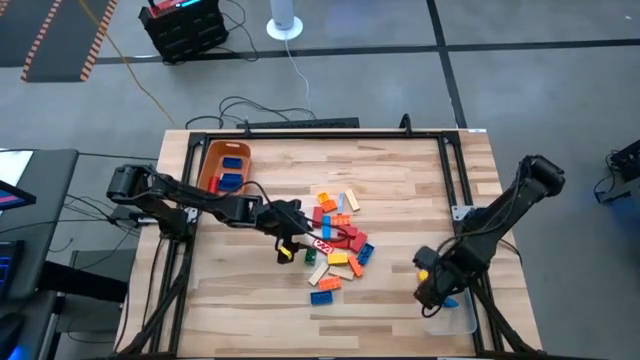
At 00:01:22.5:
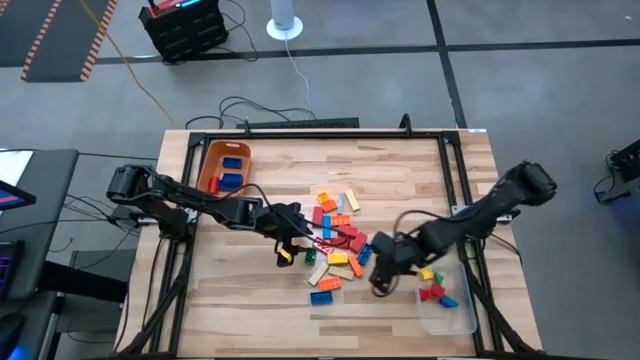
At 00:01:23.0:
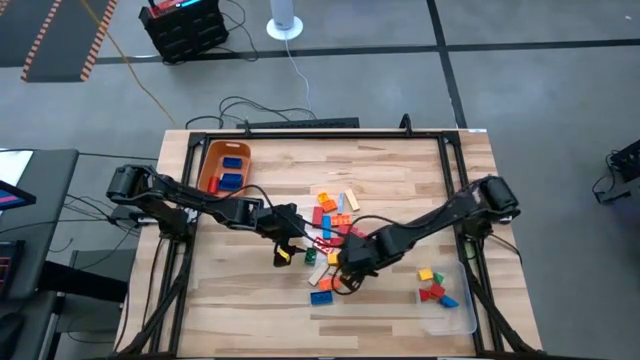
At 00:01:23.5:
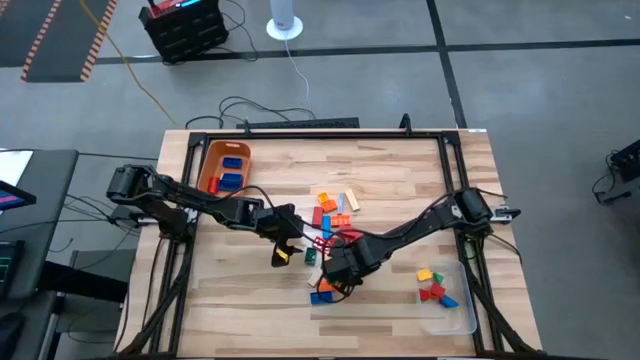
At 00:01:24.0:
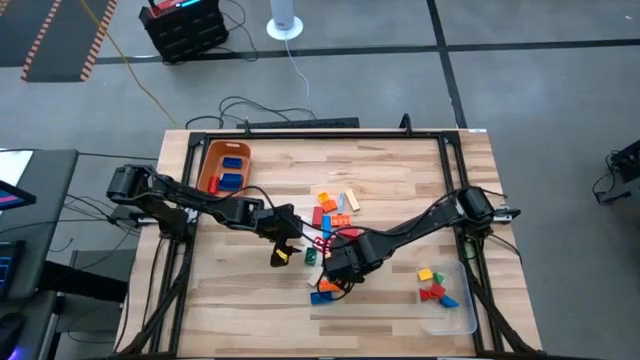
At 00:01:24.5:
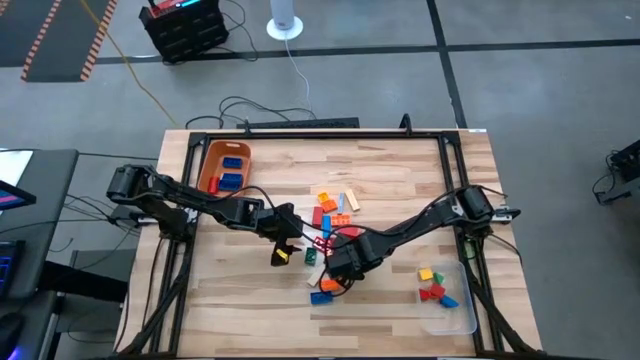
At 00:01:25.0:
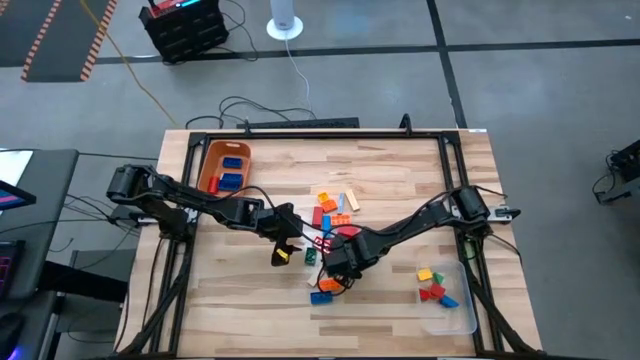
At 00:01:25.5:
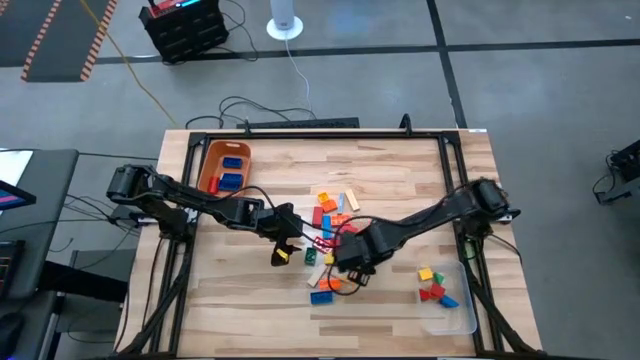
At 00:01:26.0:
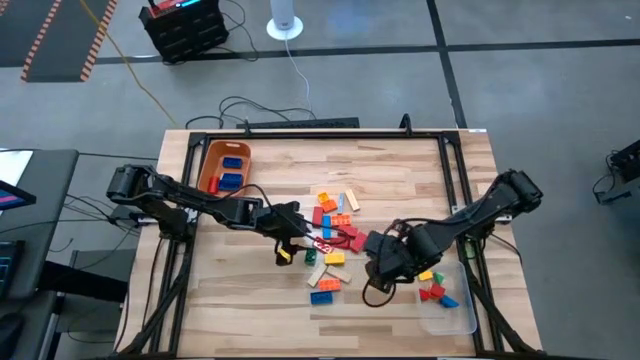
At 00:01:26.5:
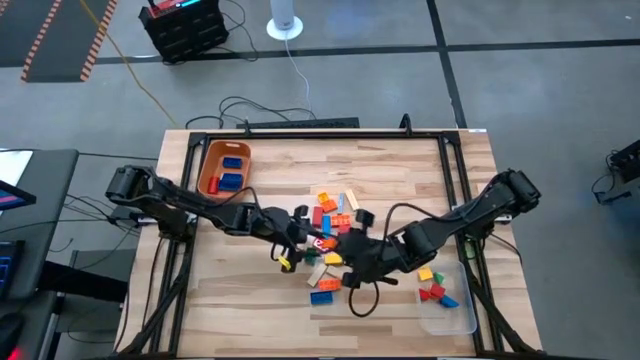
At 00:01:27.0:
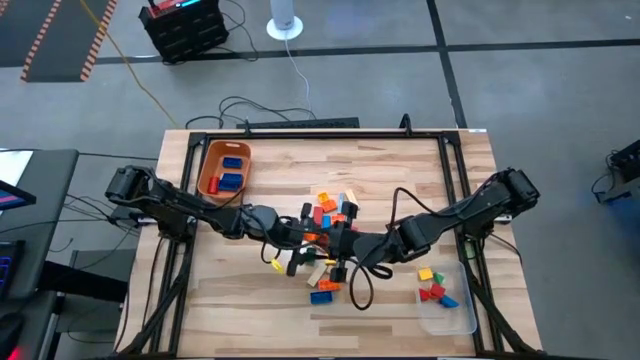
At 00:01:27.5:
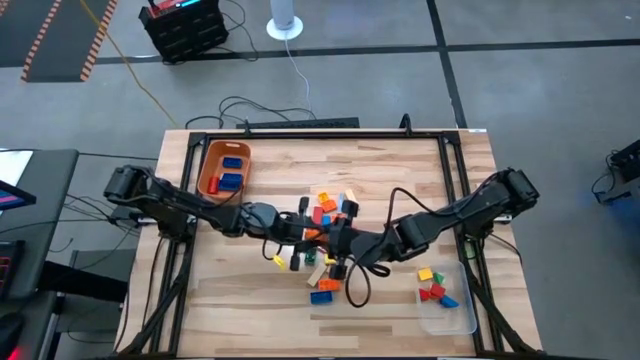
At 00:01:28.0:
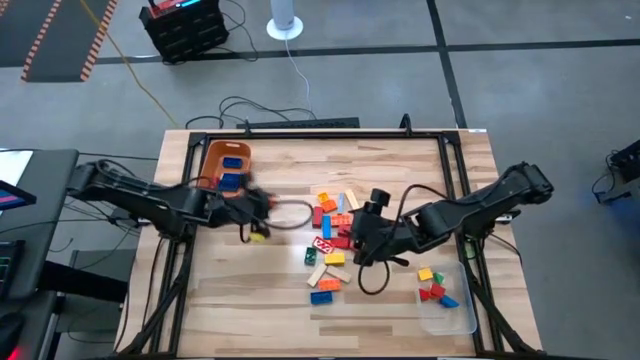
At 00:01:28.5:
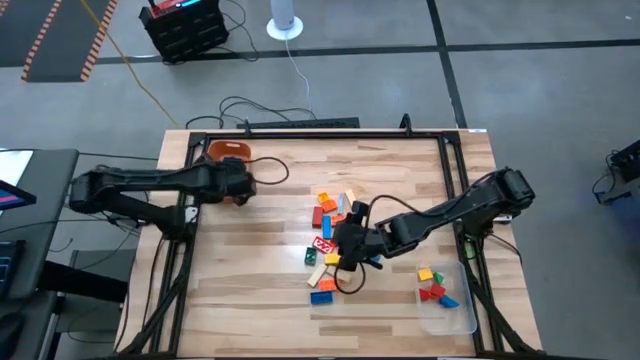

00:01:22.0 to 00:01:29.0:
Task: Sort blocks by size
Put the large orange game piece into the orange bin

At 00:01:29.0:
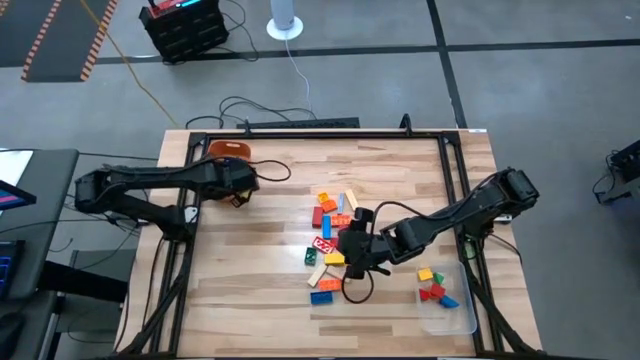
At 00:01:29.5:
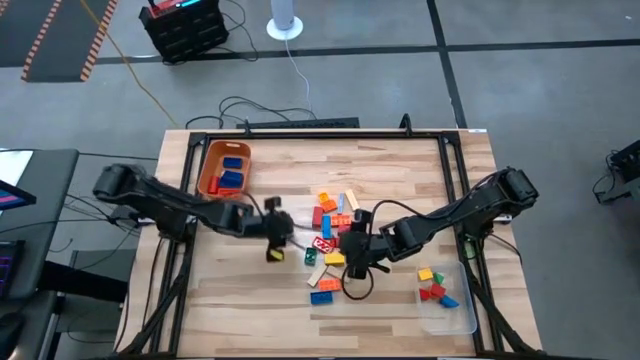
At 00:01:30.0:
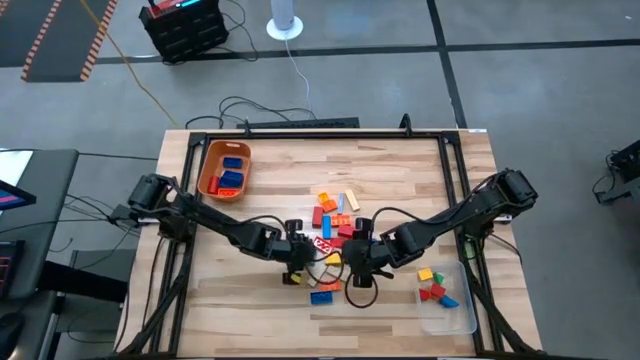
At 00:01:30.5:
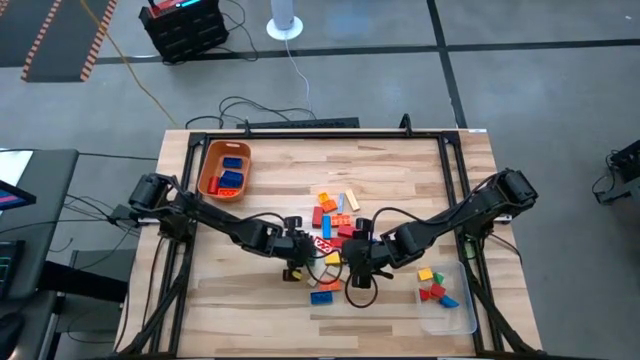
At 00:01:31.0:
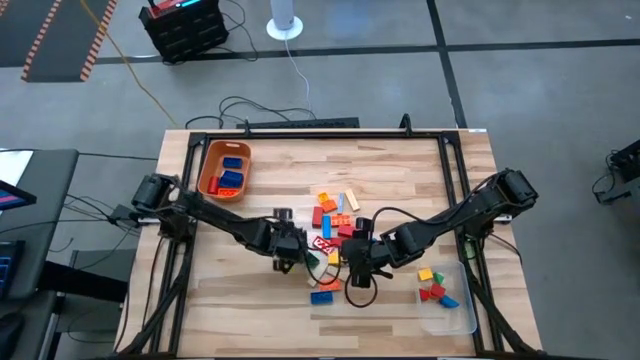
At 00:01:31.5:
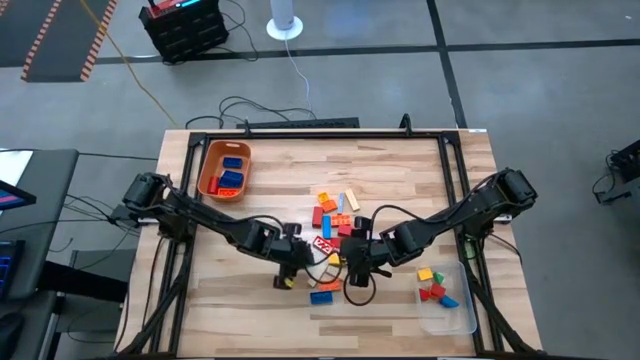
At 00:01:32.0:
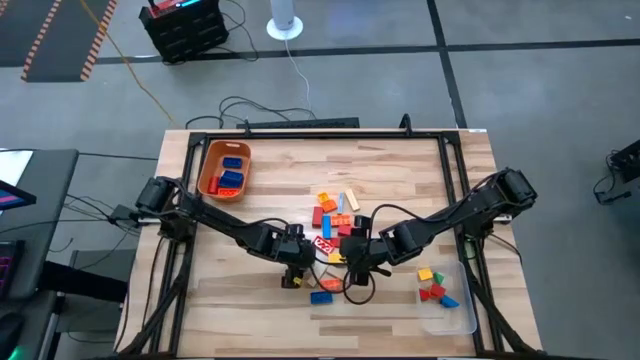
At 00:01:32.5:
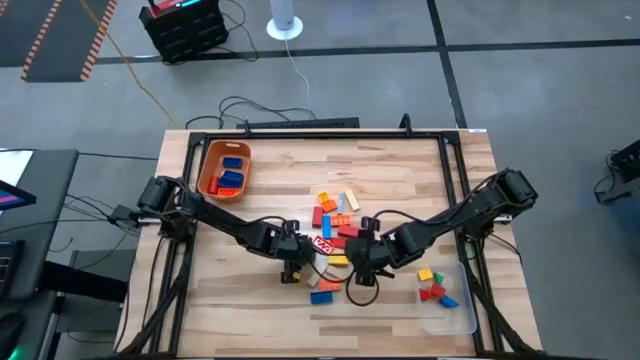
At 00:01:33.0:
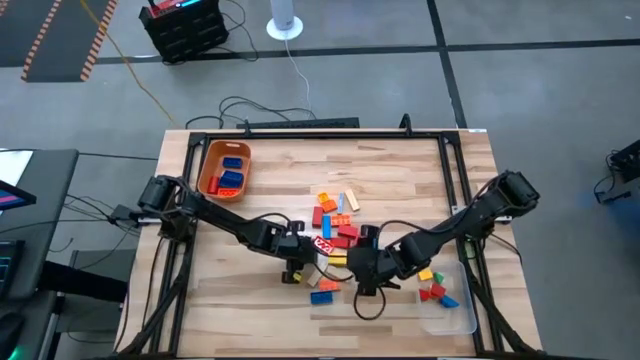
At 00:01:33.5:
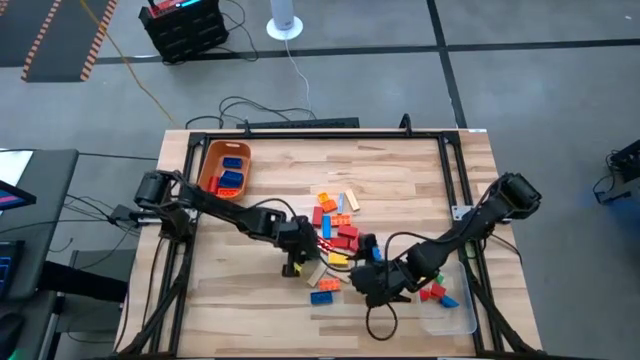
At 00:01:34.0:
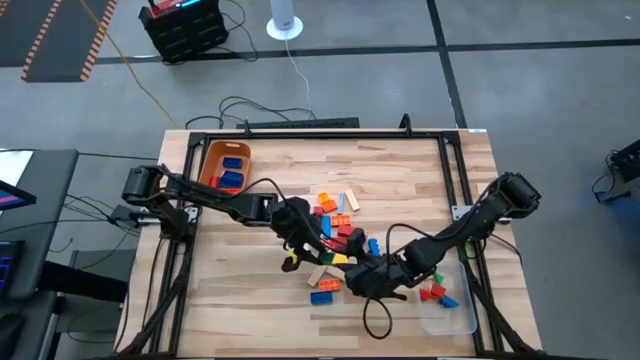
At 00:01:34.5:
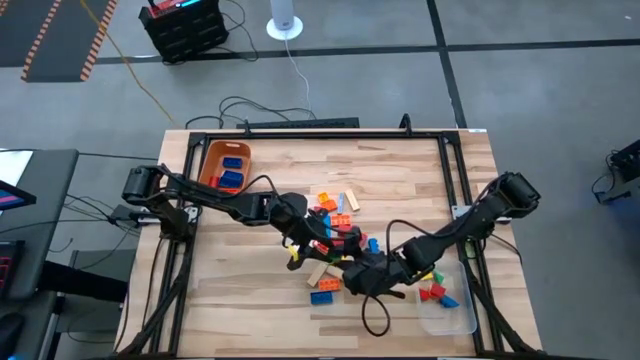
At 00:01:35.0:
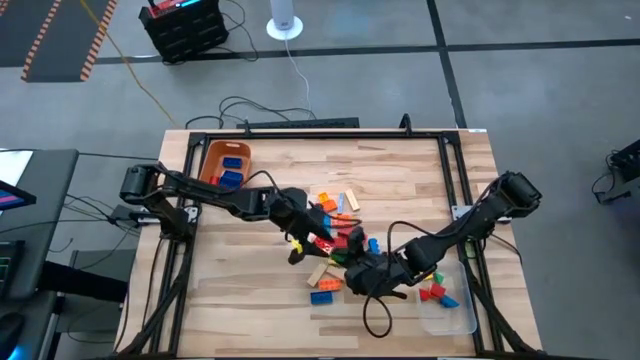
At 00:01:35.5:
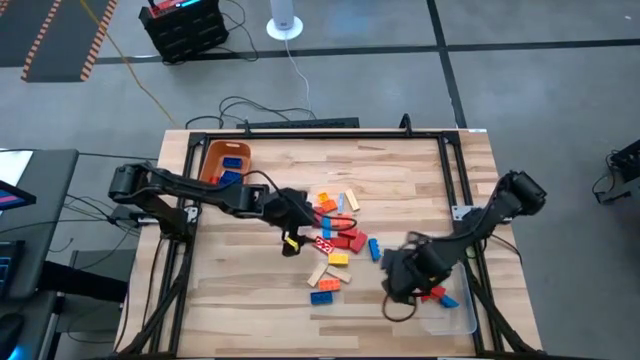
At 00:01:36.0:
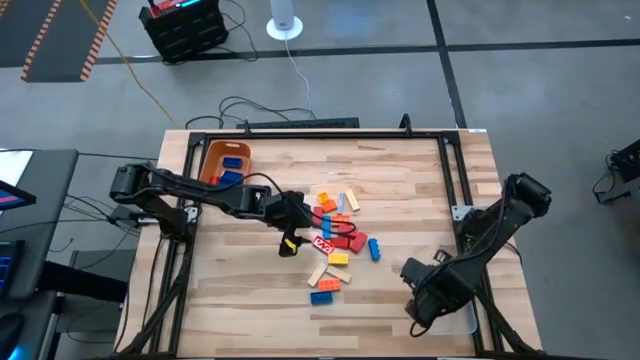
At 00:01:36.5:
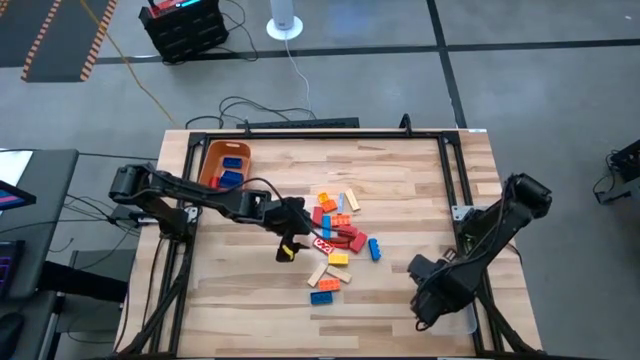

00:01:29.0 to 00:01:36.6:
Put the small green game piece into the transparent bin

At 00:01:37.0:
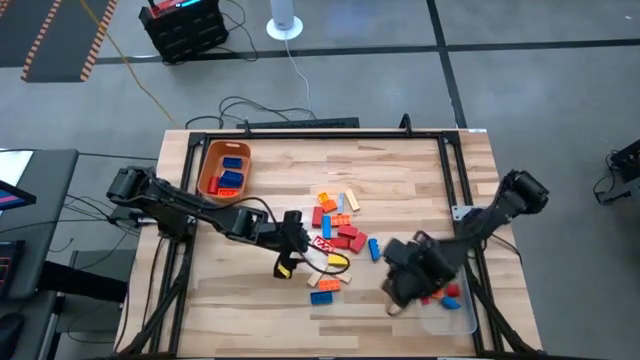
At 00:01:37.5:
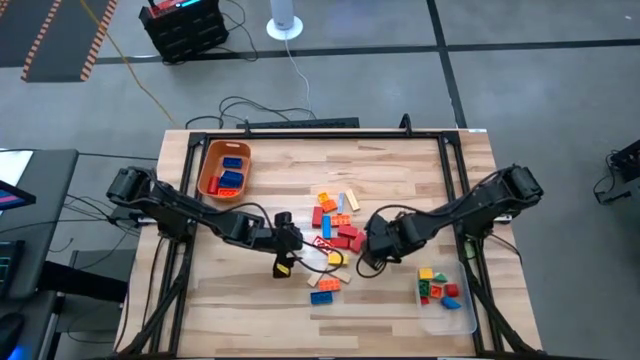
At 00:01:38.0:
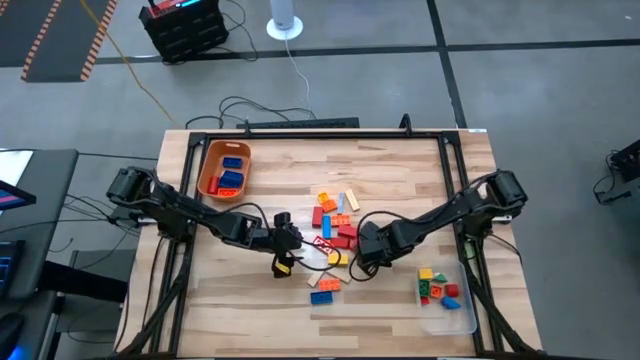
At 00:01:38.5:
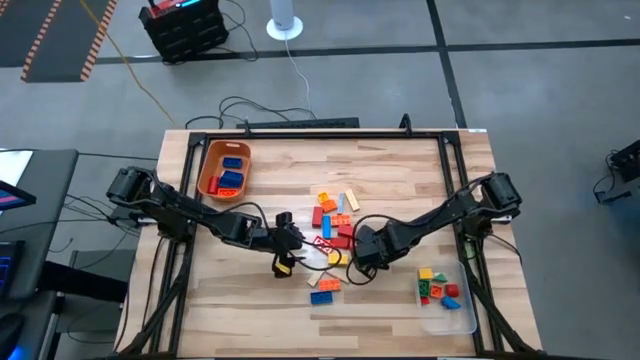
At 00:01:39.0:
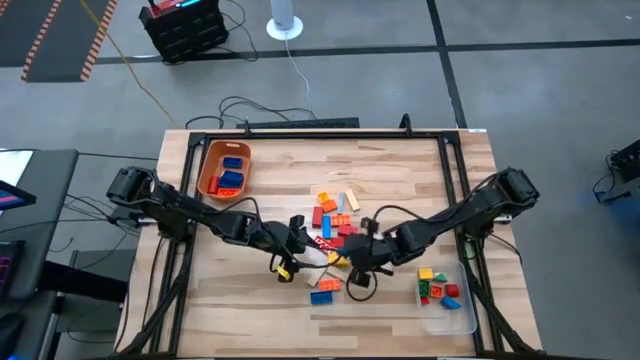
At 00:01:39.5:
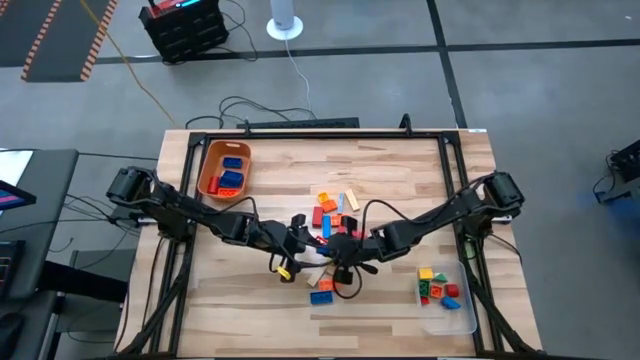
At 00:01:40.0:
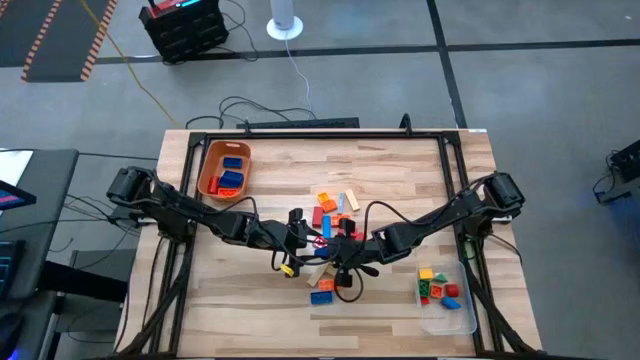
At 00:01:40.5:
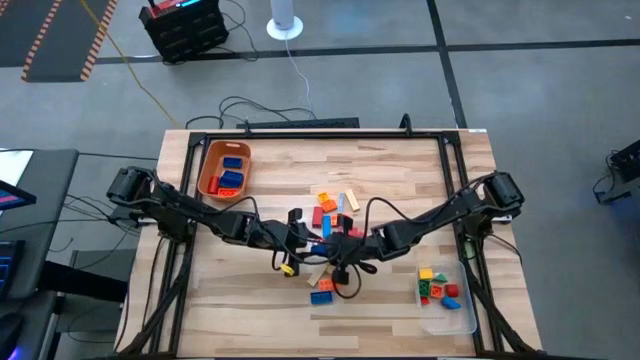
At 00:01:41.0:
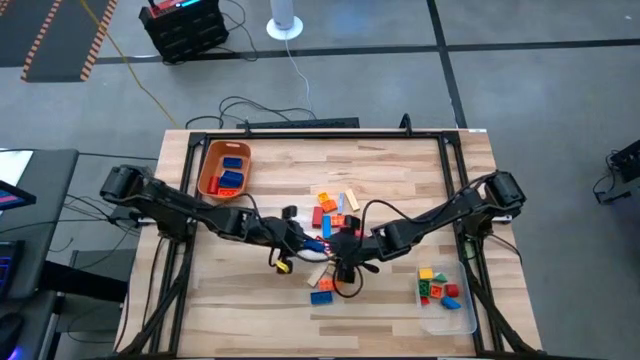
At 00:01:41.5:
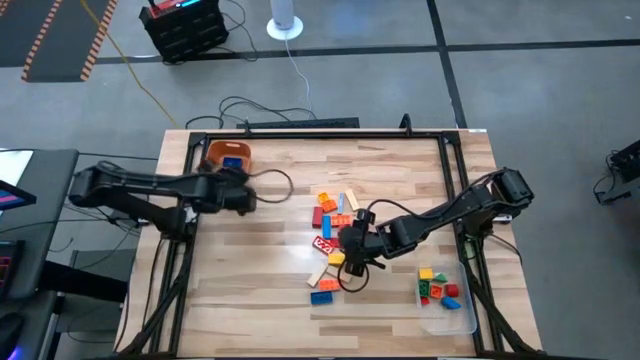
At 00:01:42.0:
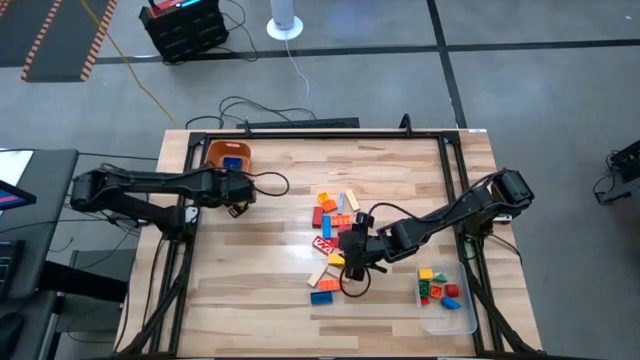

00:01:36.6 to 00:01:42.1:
Put the large blue game piece into the orange bin

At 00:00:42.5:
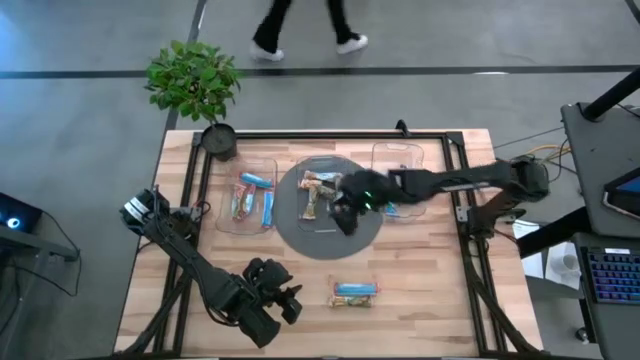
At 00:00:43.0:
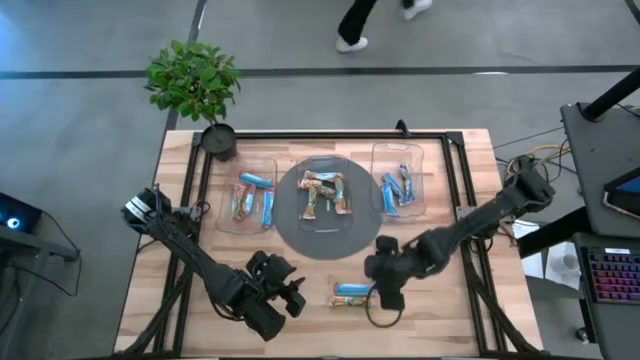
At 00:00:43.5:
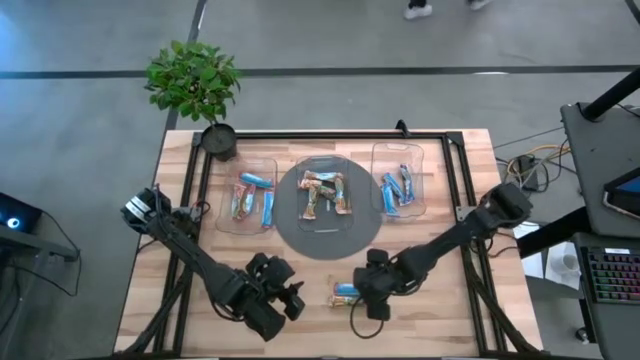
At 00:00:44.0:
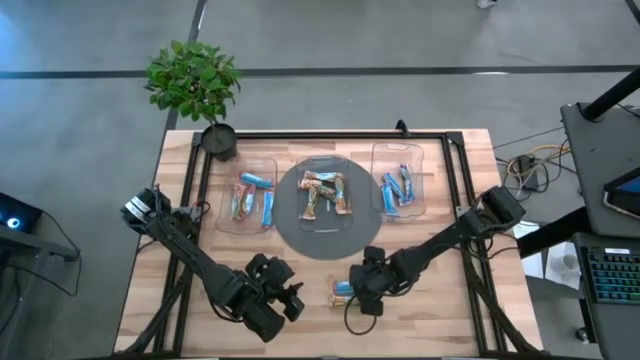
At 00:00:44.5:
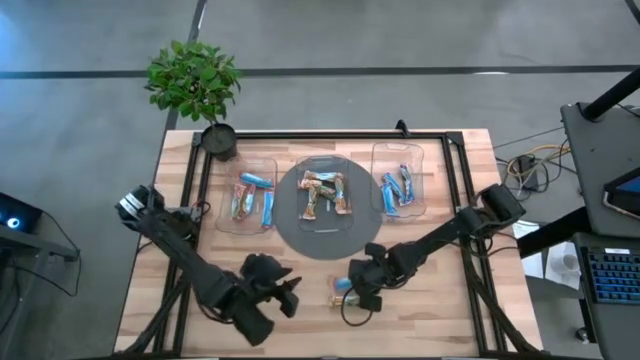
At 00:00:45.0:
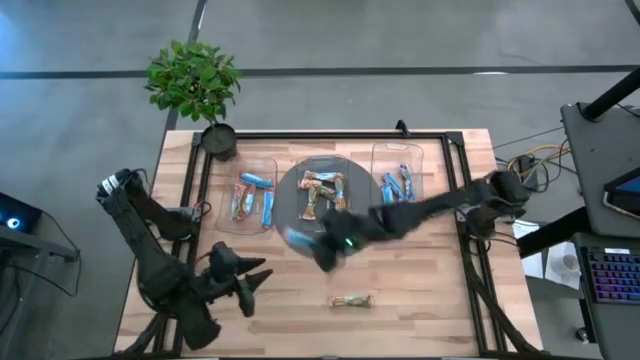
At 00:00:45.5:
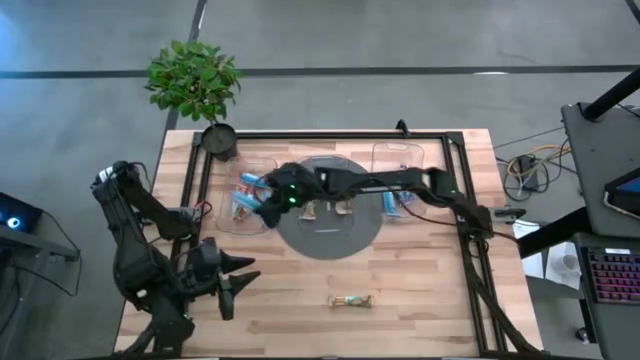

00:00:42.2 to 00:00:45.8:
Task: Pick and place Granola Bars by type
Put the red granola bar into the left transparent bin
